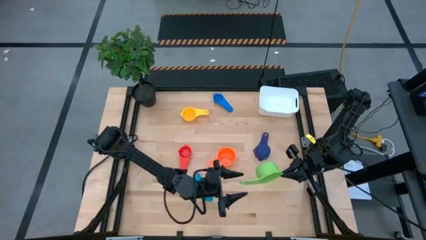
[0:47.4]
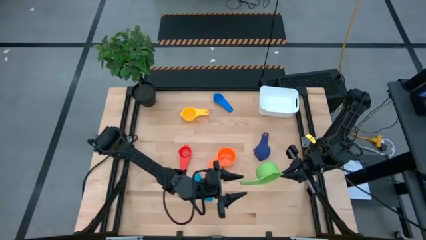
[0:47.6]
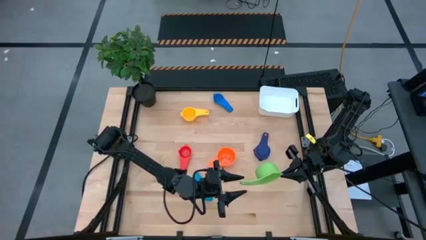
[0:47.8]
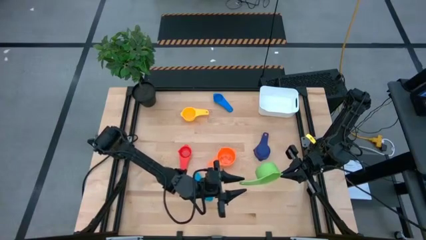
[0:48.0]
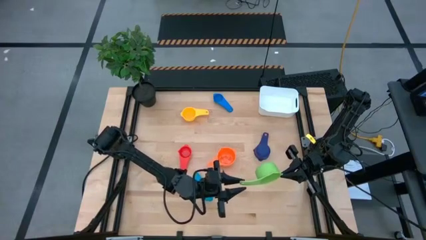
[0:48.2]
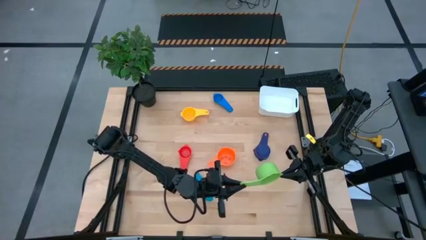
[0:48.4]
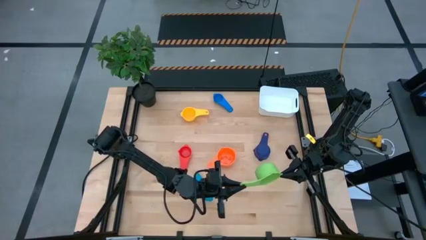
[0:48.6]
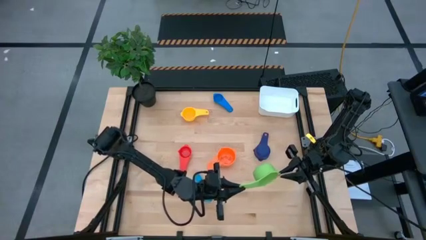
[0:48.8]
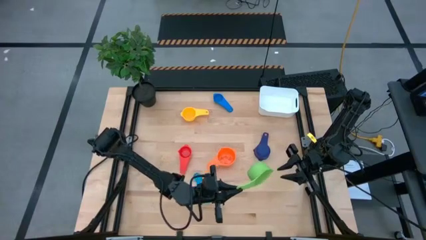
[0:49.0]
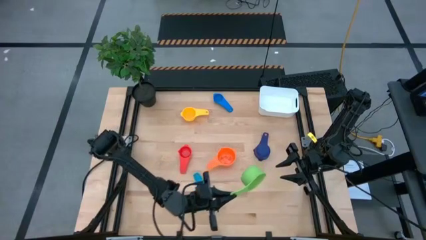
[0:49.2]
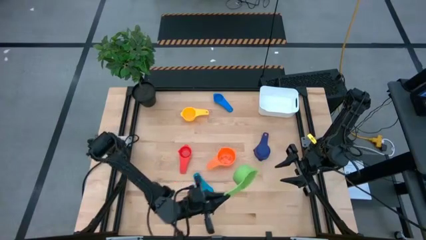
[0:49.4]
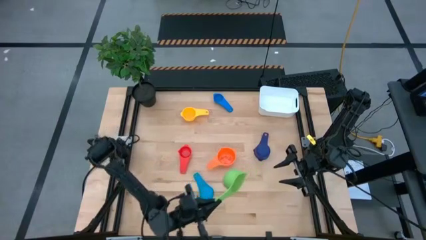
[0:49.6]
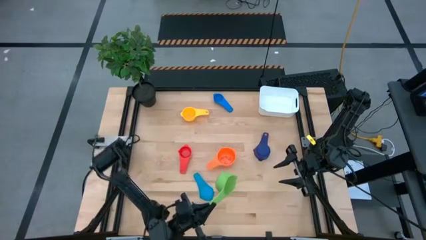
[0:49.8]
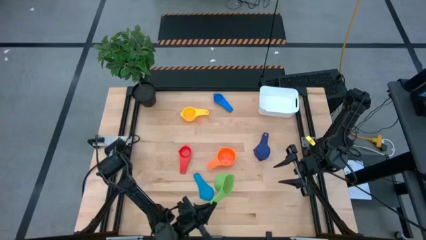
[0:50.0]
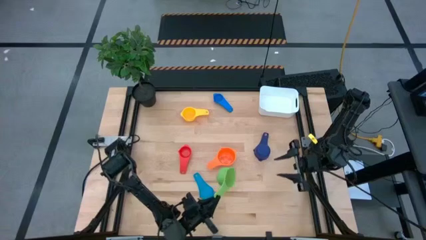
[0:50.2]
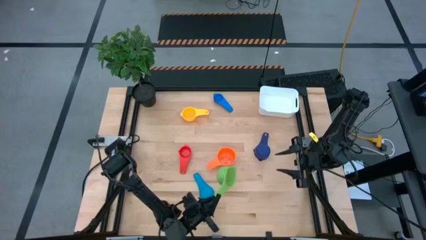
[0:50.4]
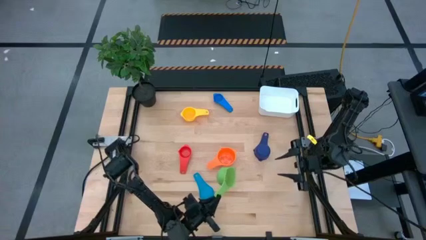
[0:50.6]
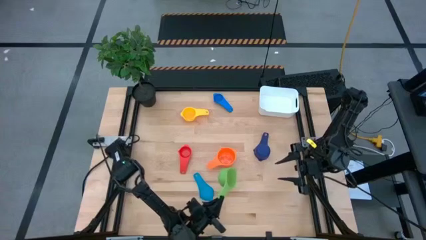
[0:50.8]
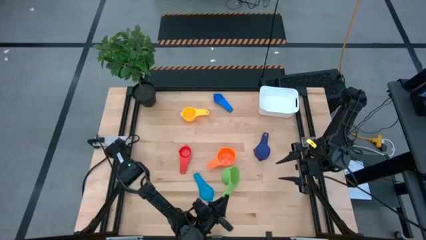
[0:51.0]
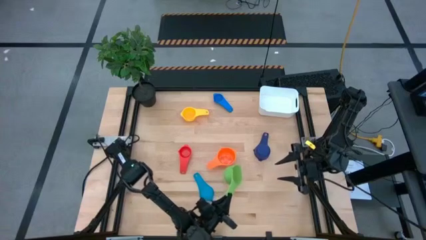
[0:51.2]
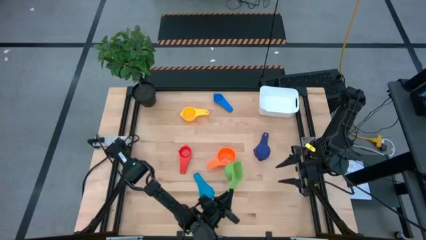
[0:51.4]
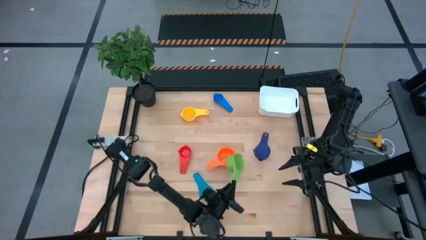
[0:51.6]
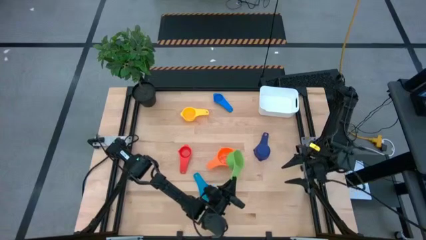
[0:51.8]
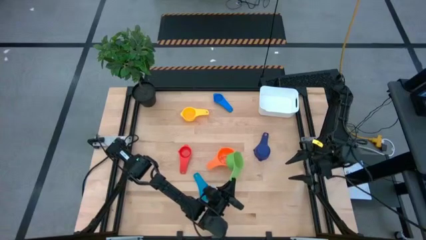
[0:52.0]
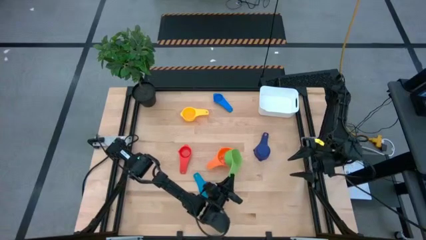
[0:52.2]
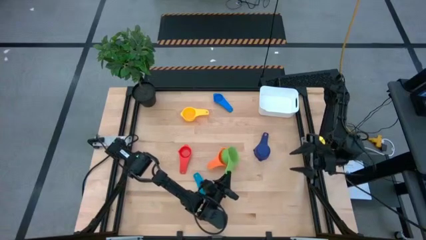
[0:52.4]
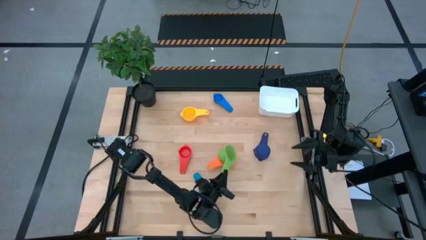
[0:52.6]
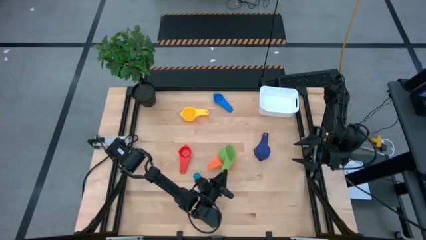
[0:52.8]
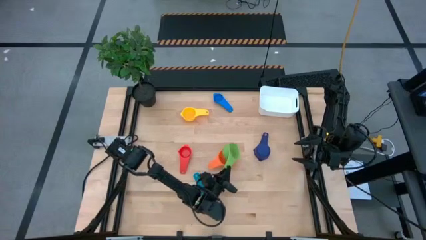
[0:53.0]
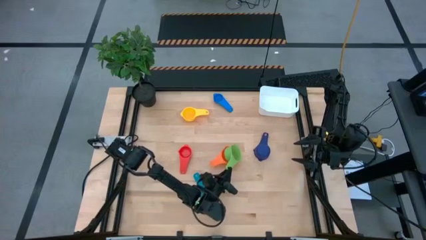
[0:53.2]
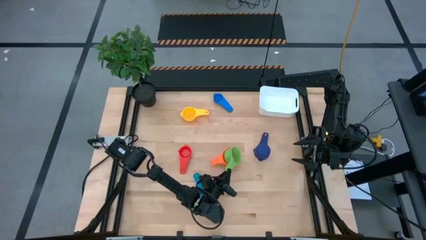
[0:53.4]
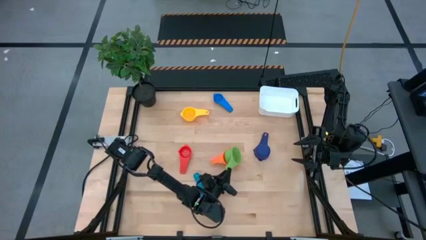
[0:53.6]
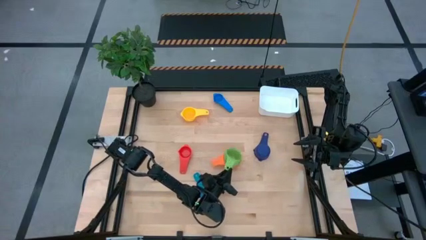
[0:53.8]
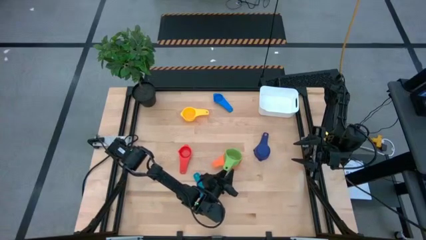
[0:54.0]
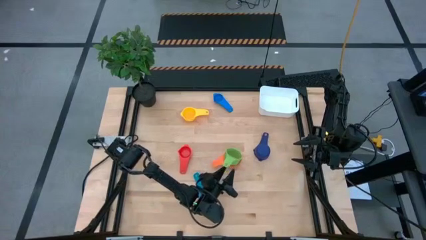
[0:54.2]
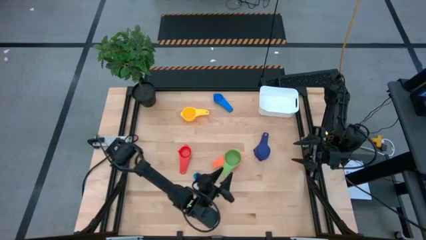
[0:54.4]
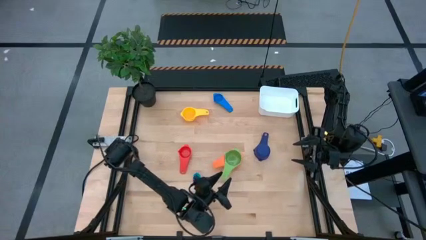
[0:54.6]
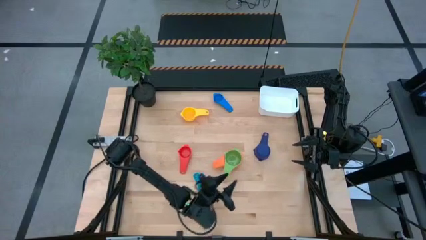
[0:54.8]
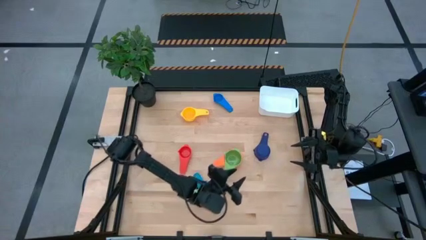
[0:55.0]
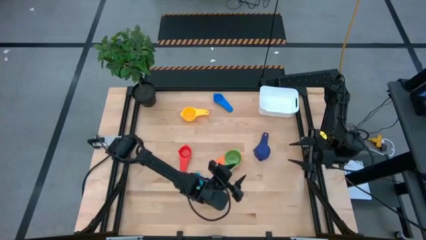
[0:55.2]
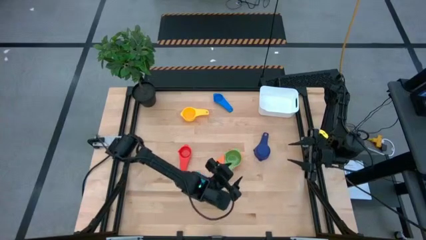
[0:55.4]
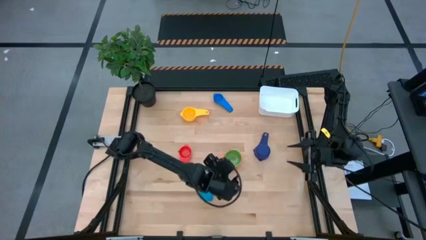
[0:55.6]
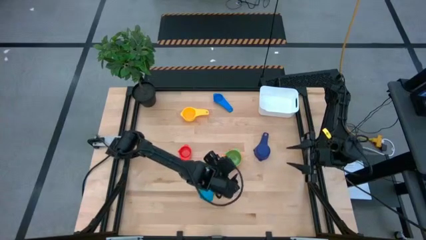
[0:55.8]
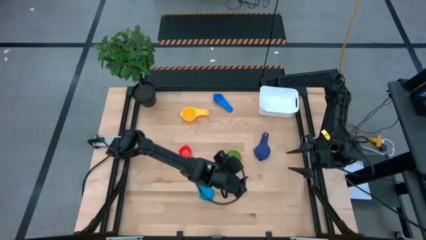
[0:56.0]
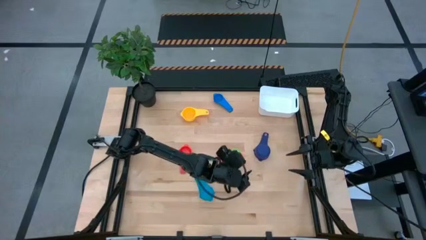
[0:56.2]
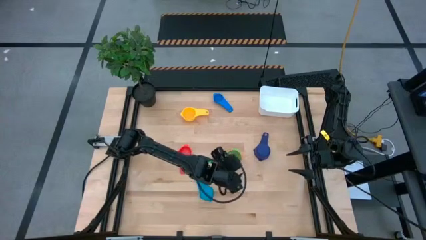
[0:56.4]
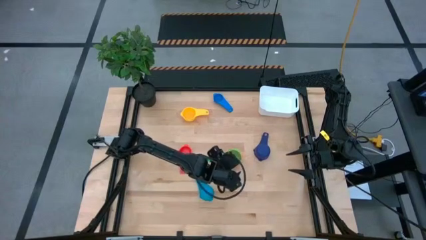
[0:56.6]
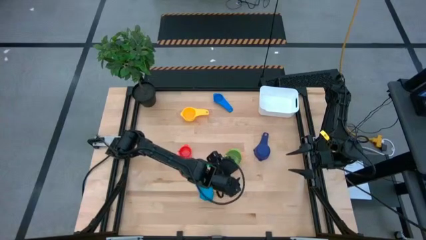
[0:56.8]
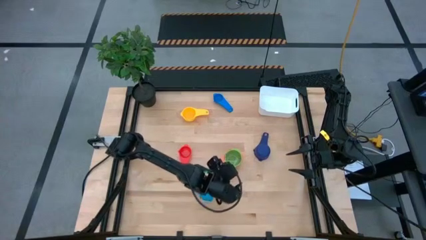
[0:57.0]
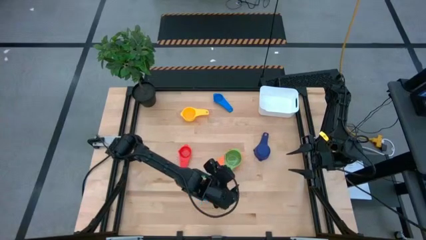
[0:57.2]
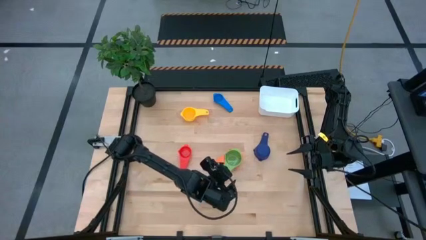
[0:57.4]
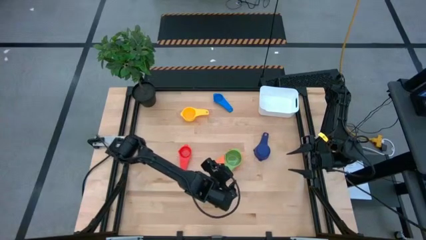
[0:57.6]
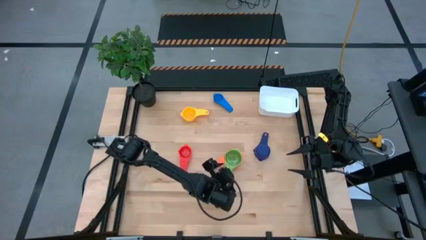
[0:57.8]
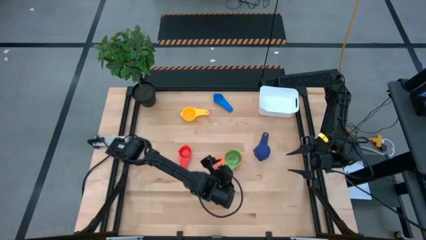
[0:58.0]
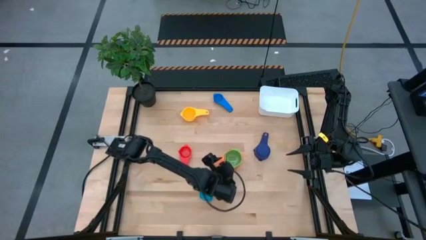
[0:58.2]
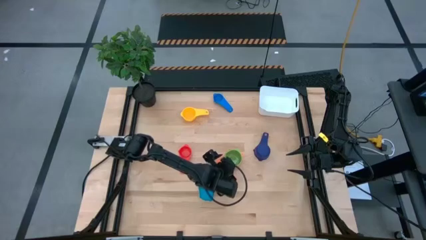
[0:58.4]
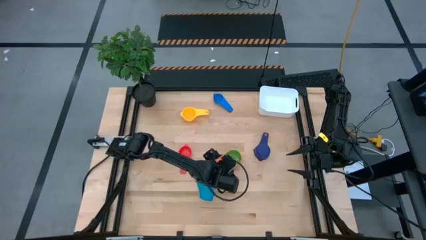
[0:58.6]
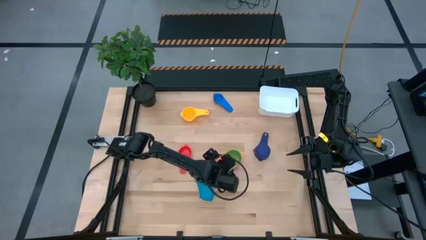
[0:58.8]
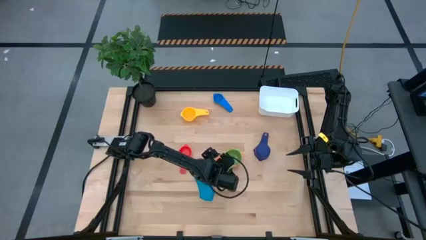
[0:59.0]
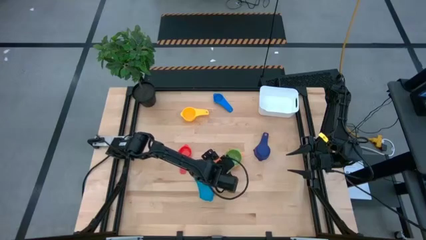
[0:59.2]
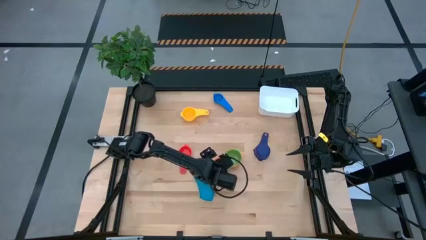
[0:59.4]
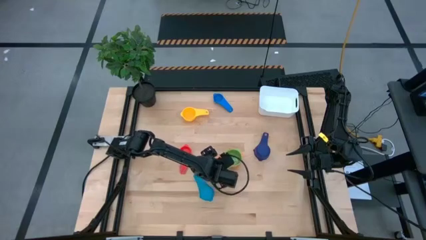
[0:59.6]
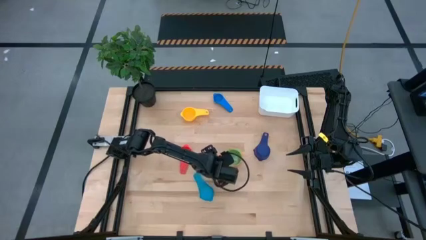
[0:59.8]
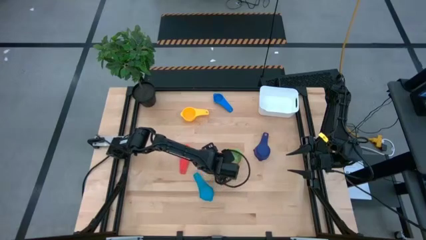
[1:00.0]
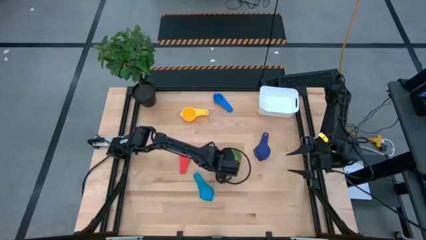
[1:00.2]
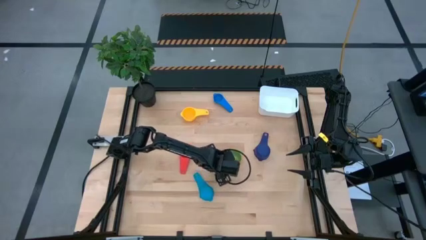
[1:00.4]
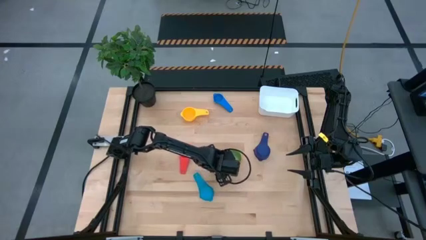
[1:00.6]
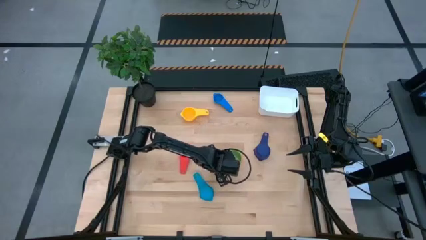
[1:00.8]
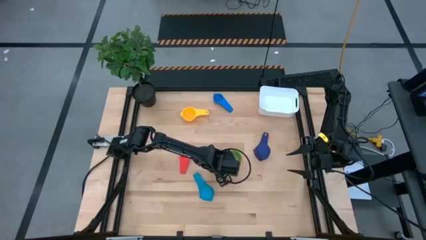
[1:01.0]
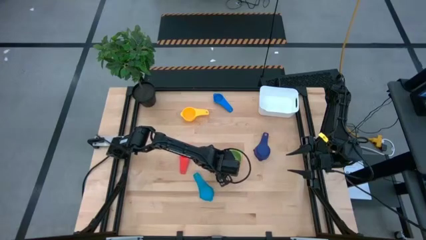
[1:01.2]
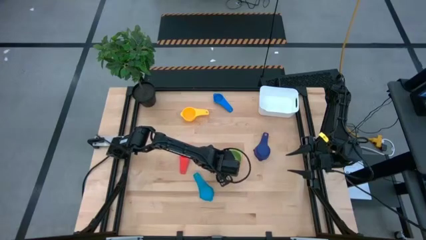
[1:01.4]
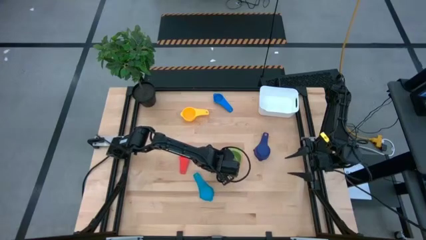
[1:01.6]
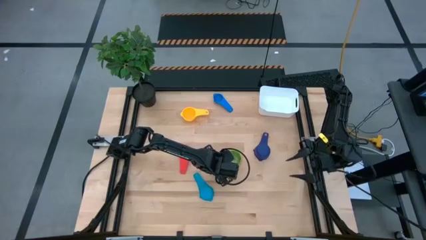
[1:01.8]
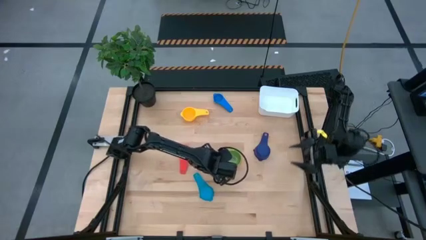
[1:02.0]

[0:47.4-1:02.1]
Task: Nest measuring cups in basket
Stack the green measuring cup on top of the orange measuring cup

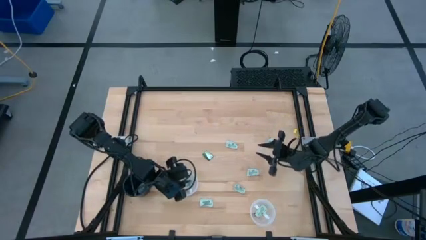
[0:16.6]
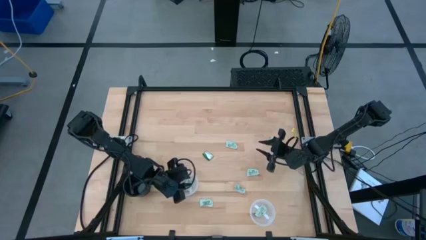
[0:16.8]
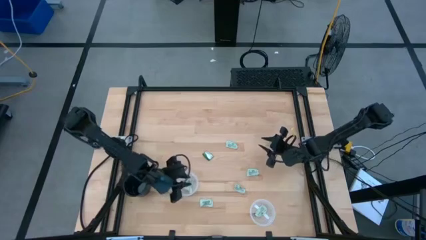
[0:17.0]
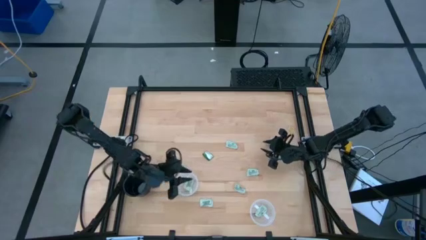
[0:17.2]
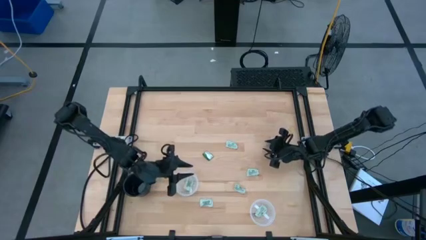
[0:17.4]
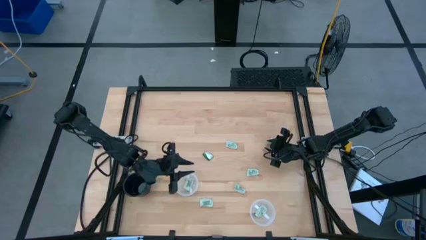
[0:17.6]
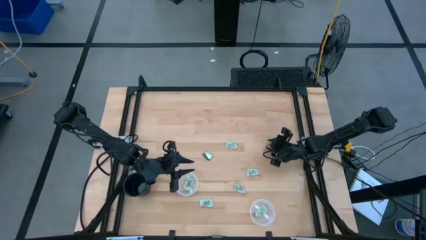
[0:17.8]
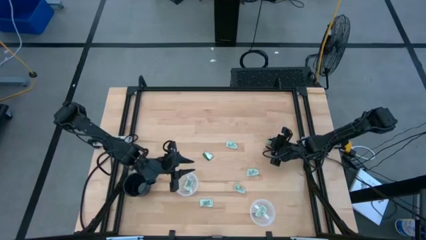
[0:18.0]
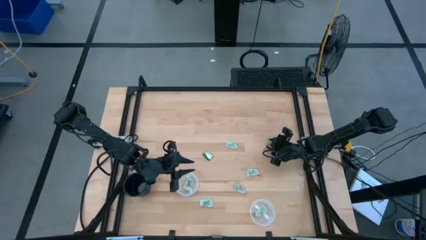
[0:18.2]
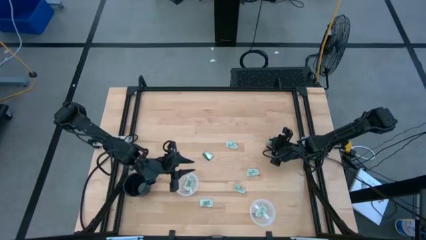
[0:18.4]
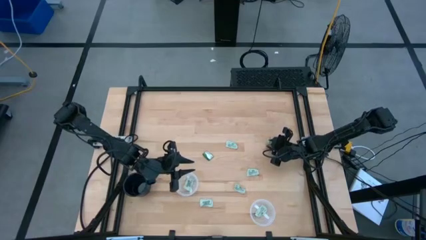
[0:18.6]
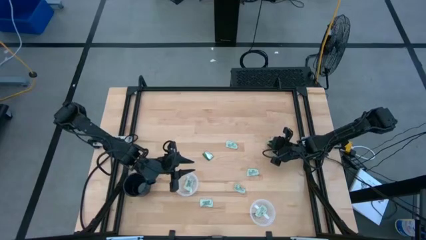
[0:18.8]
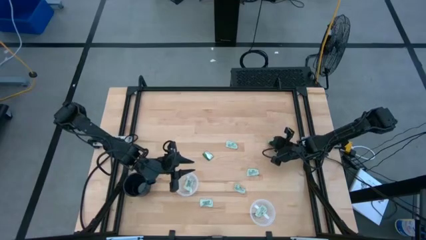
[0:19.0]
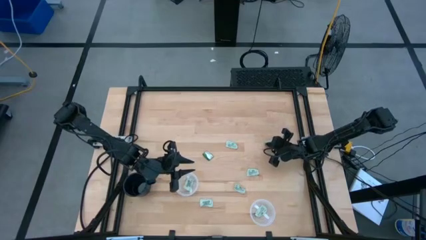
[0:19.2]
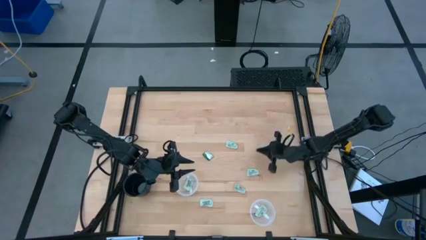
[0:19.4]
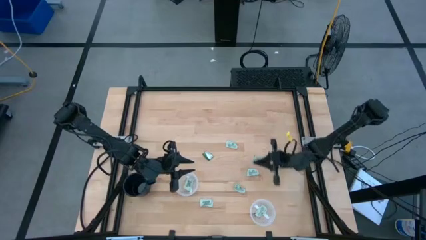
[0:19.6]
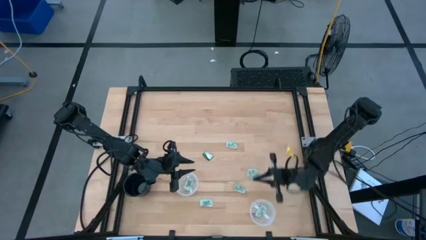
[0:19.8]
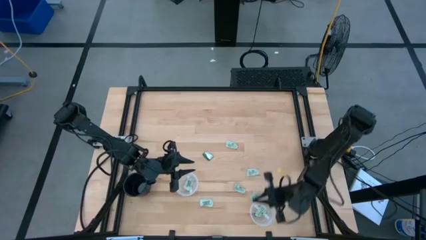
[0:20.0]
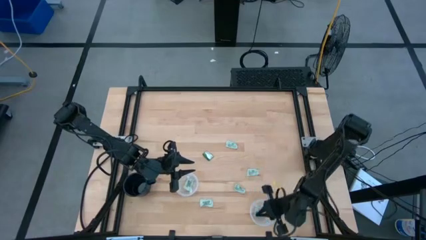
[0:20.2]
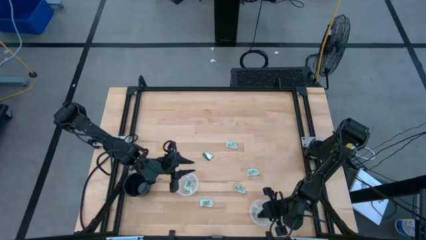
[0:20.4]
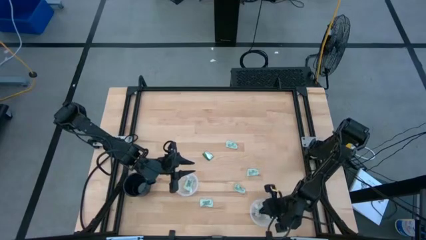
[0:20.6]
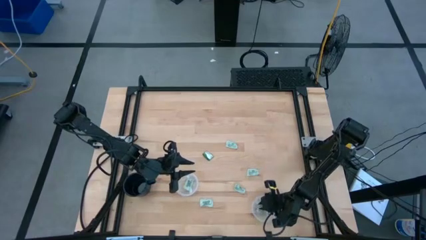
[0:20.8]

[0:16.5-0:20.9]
Task: Pick and place items into bin
Put the stevia packet into the bottom transparent bin
